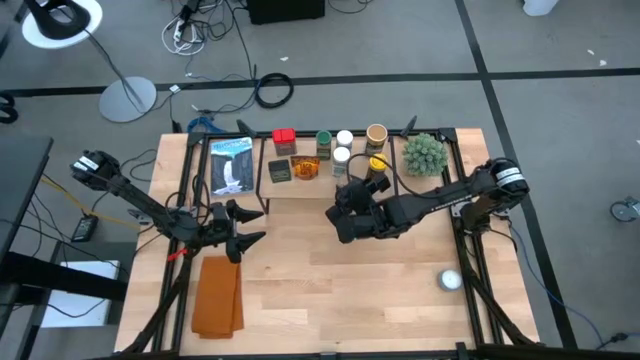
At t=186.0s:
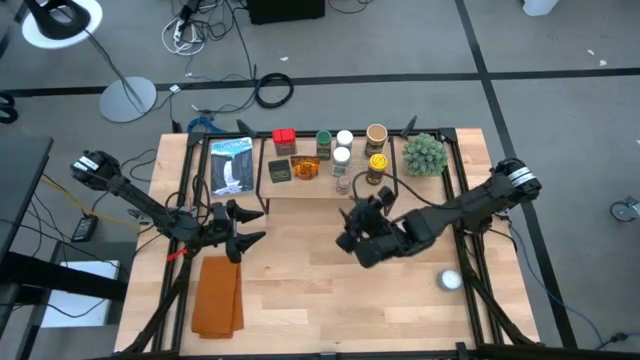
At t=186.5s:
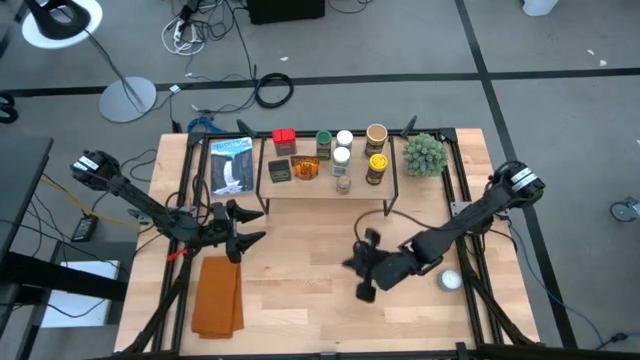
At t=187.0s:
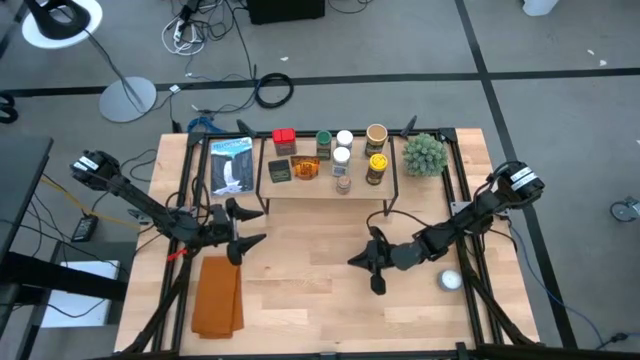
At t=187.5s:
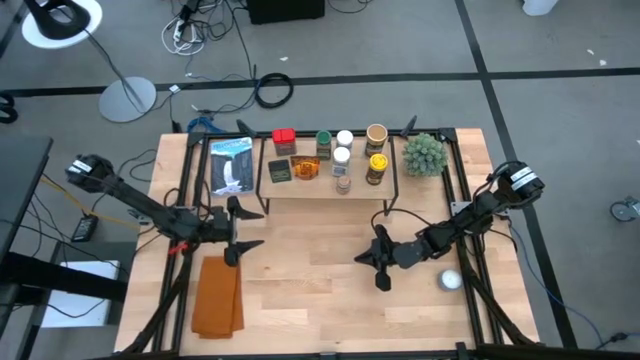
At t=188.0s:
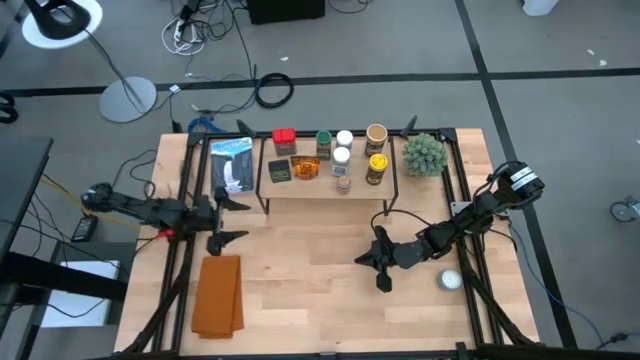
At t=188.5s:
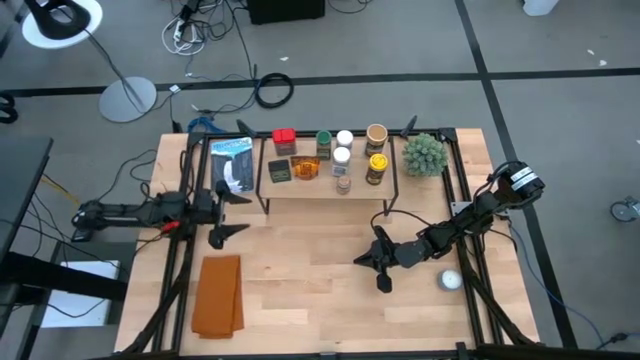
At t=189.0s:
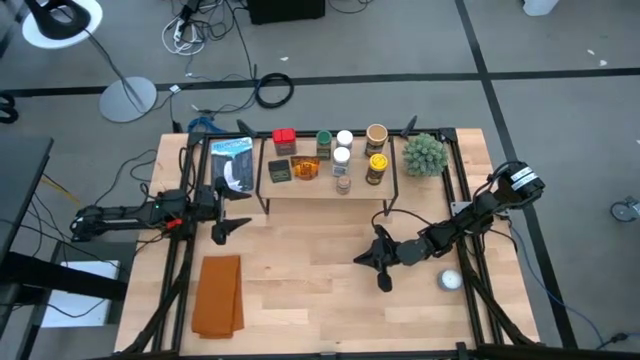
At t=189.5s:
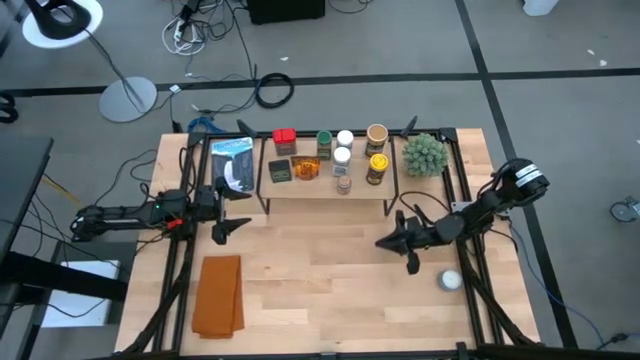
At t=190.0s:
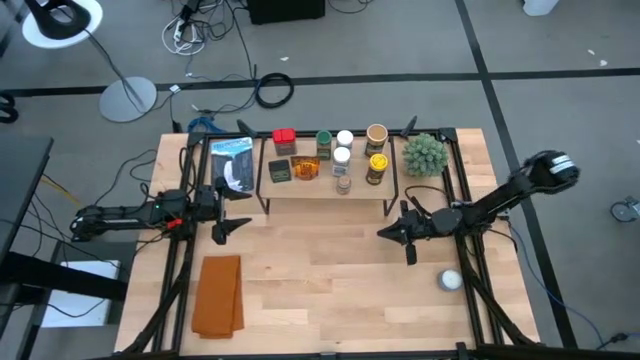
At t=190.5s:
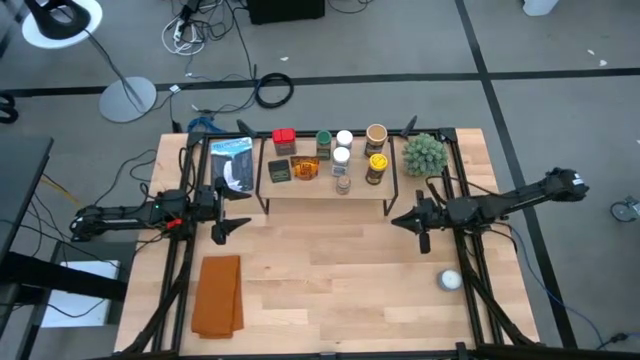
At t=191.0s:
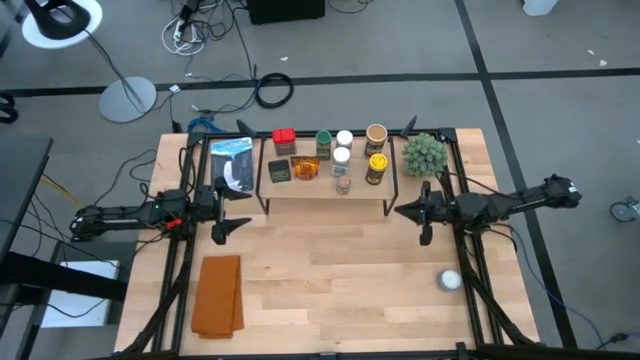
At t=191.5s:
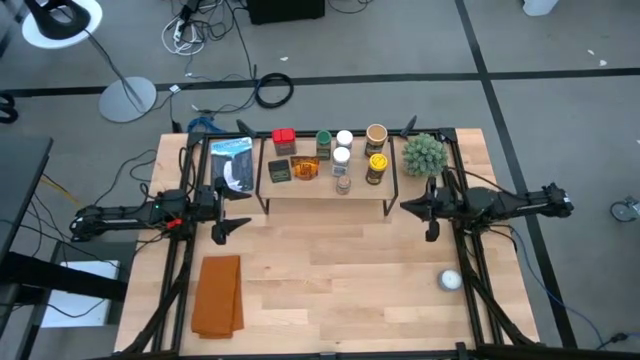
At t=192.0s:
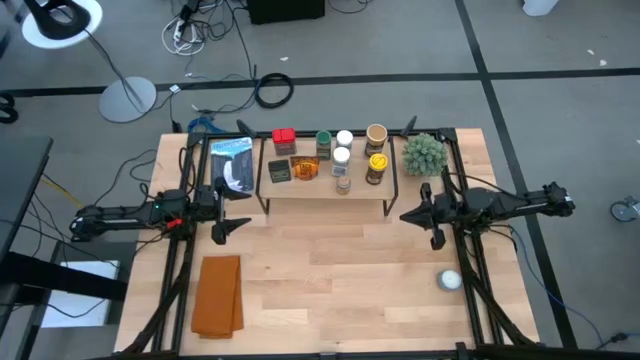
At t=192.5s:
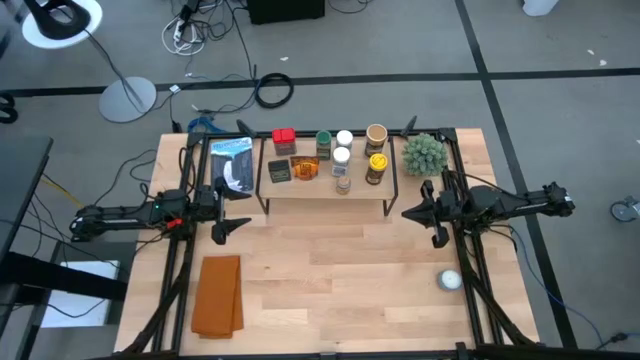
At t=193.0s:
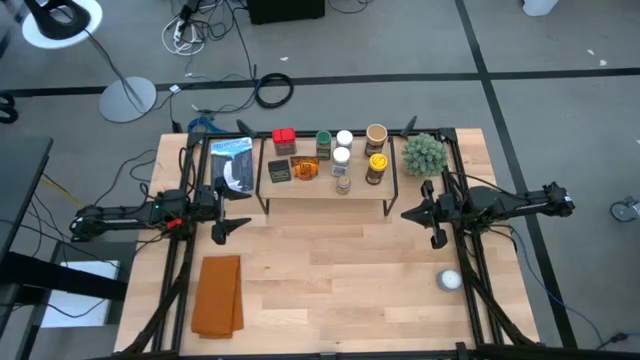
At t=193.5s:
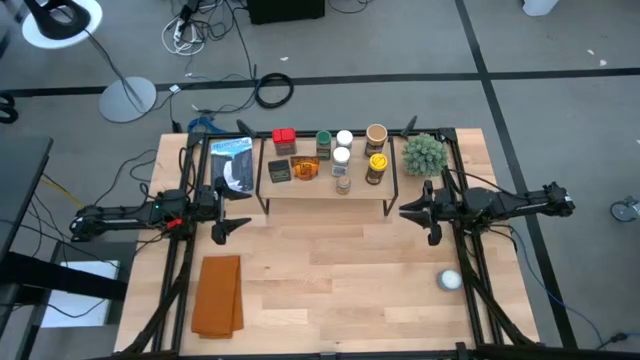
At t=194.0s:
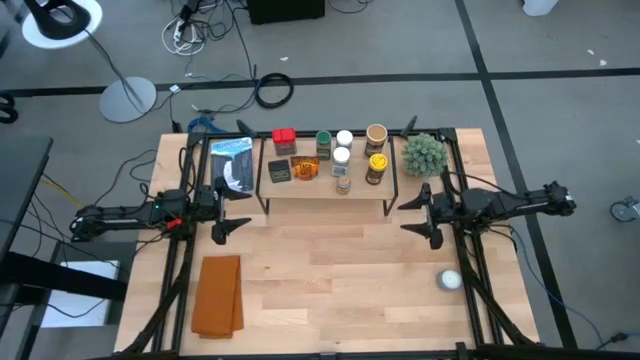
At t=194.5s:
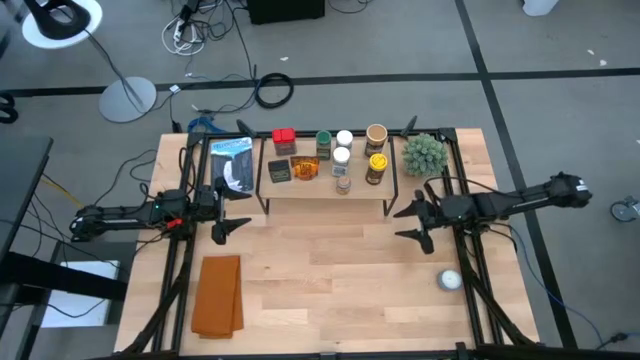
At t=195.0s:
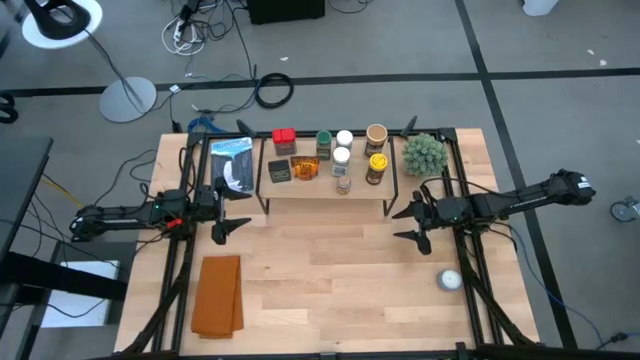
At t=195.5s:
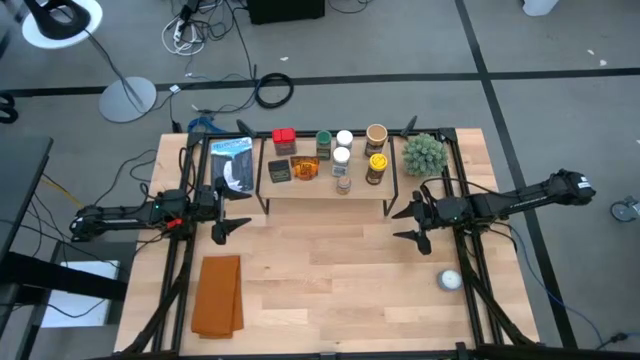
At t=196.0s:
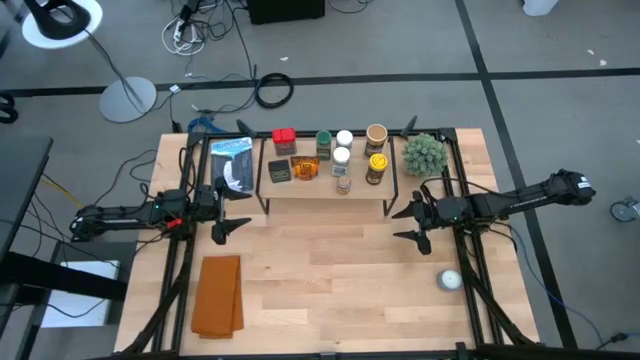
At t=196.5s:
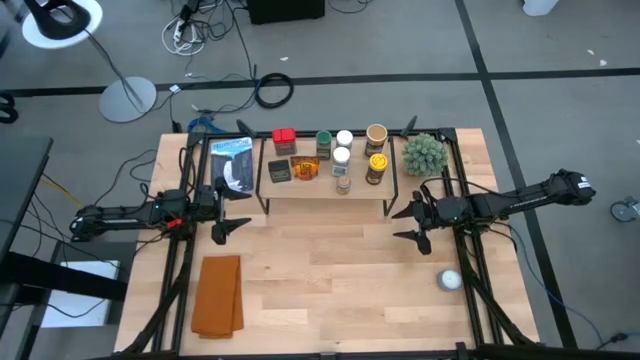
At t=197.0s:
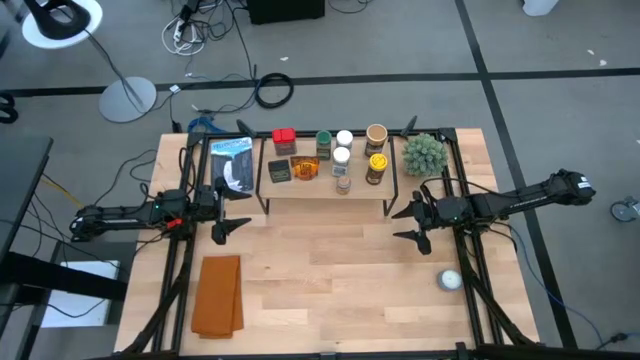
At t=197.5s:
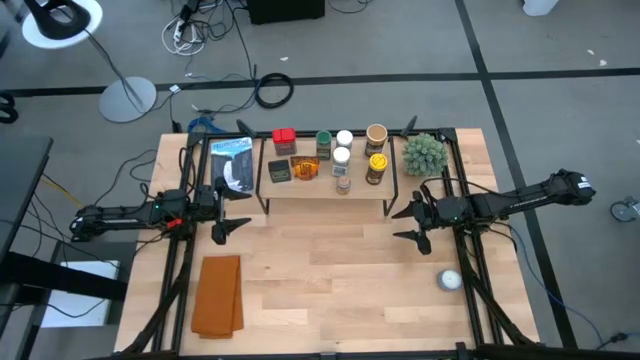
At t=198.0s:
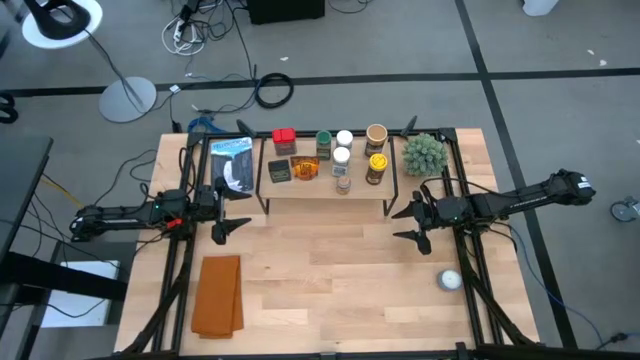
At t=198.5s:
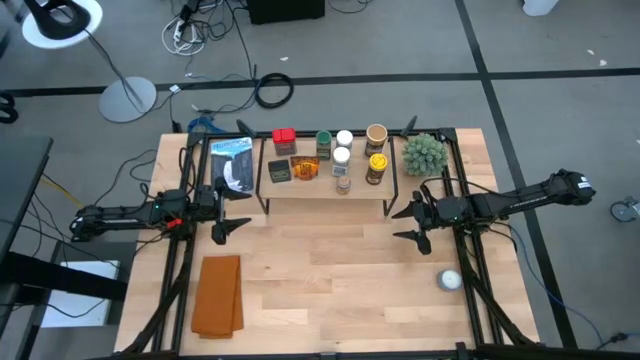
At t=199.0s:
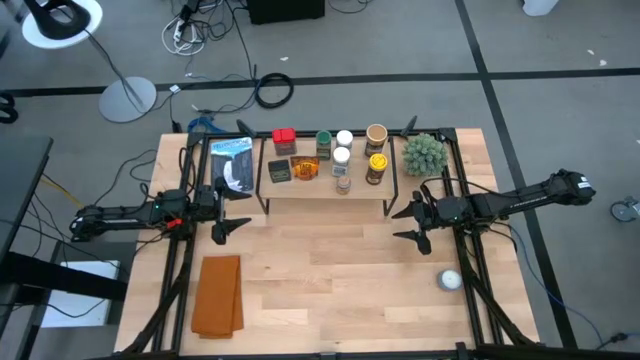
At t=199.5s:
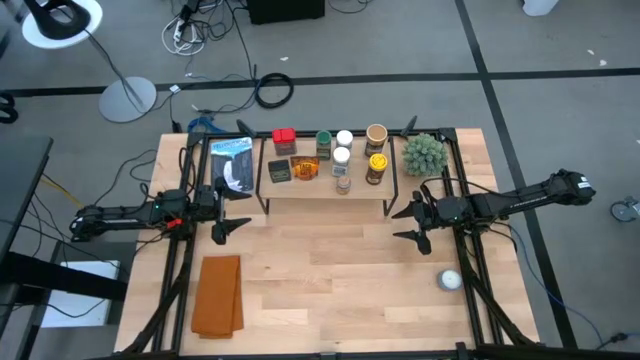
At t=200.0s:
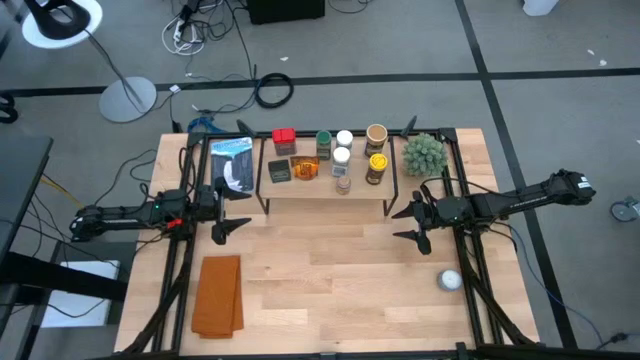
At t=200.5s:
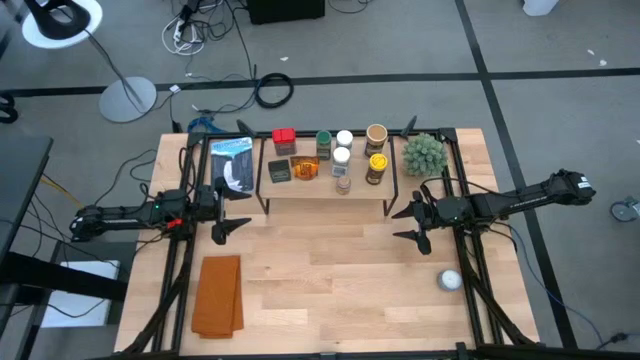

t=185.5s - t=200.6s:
Task: Shelf spices
Return to Home Position

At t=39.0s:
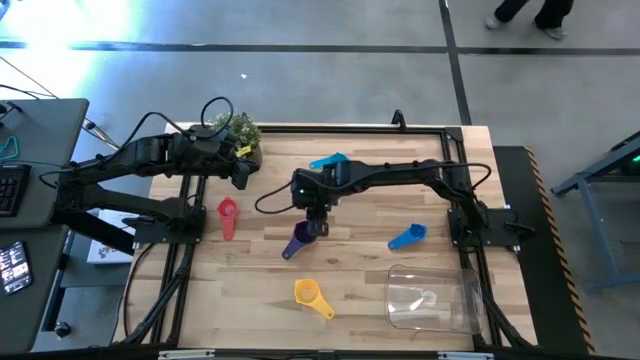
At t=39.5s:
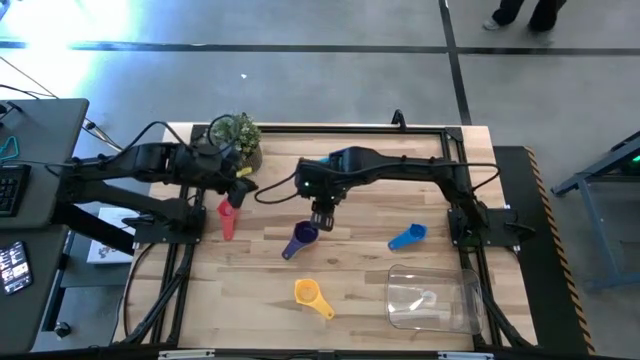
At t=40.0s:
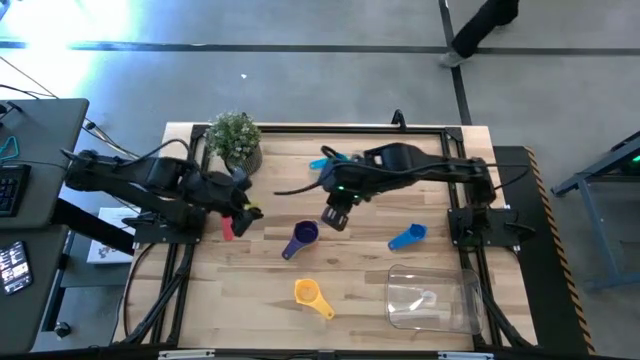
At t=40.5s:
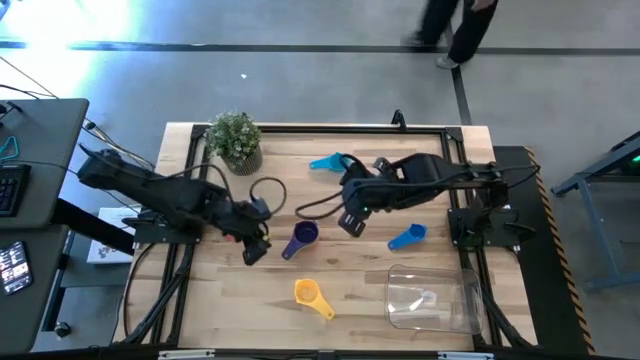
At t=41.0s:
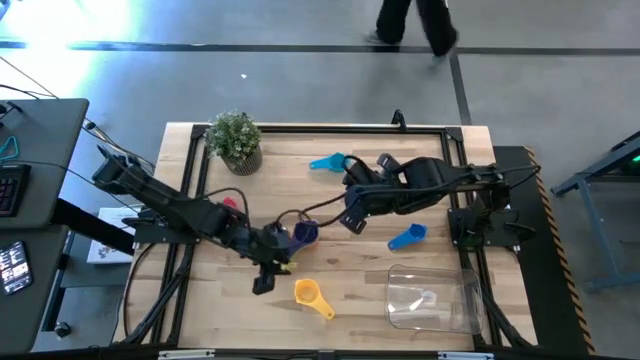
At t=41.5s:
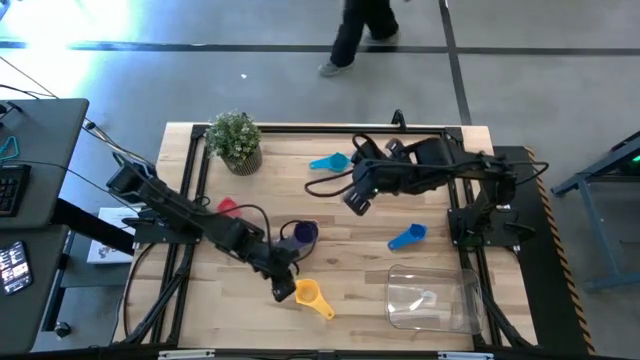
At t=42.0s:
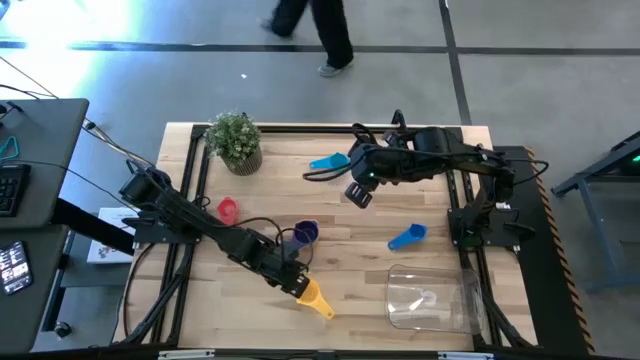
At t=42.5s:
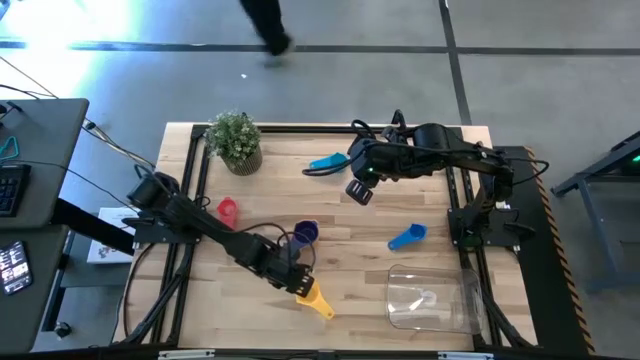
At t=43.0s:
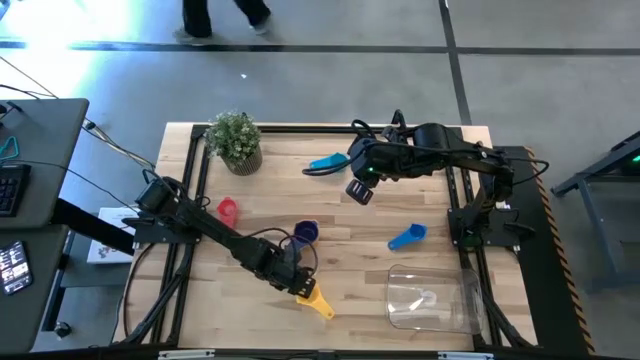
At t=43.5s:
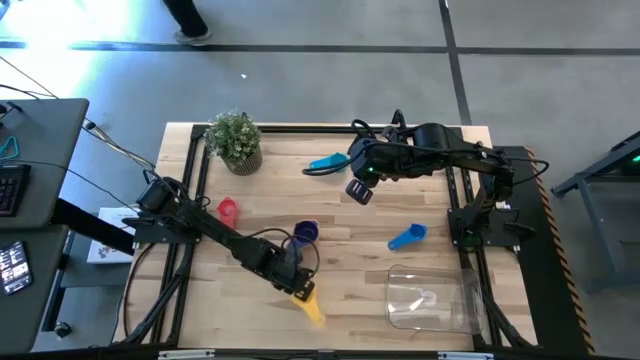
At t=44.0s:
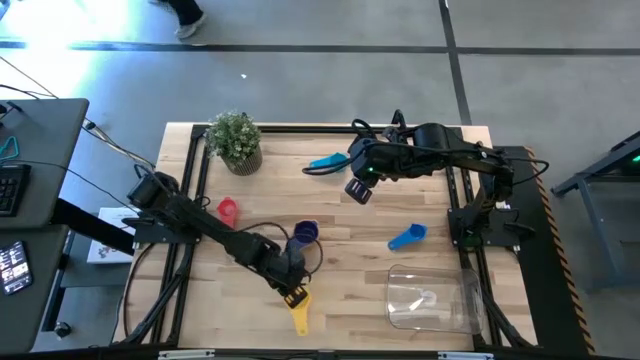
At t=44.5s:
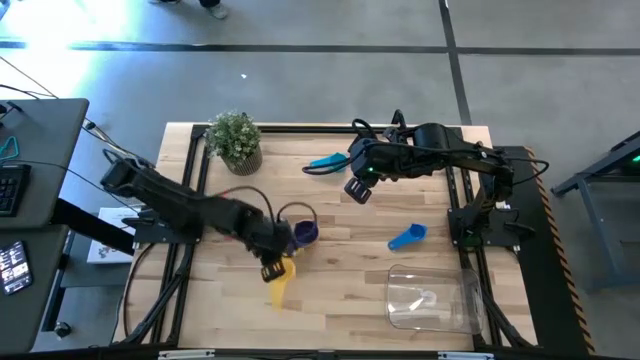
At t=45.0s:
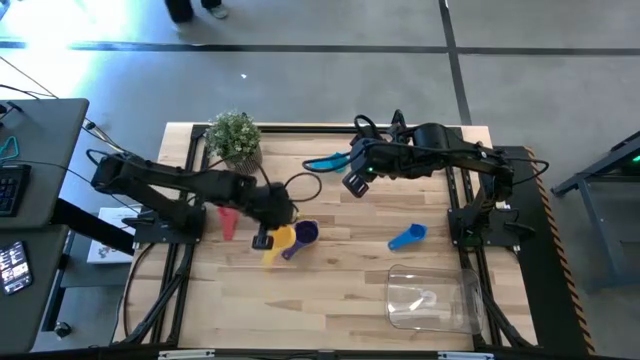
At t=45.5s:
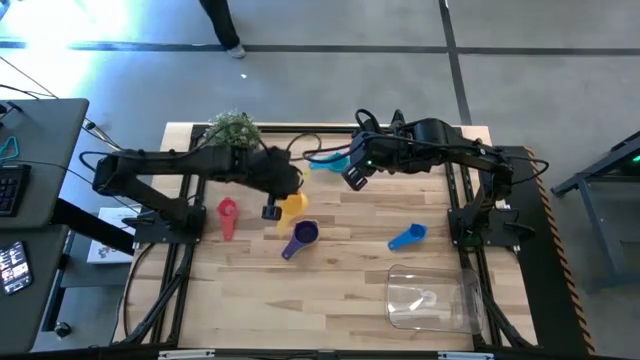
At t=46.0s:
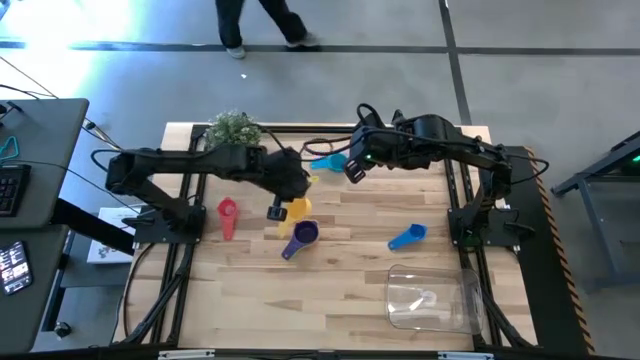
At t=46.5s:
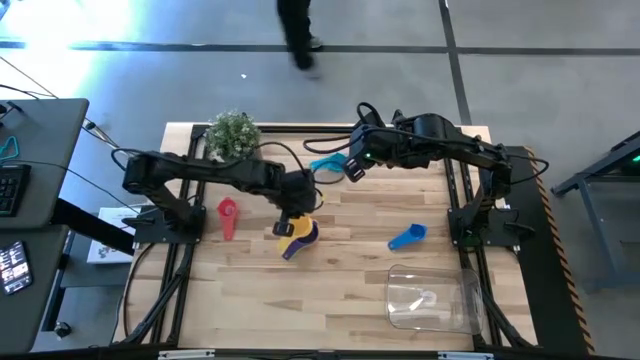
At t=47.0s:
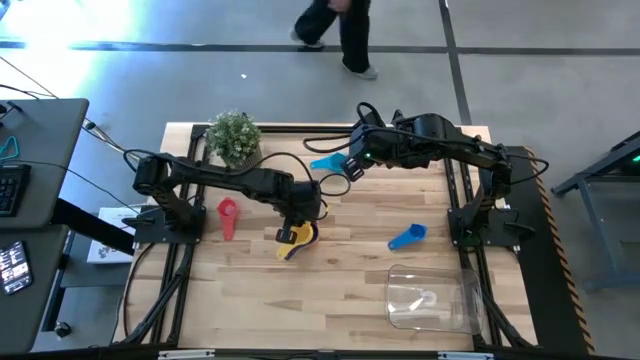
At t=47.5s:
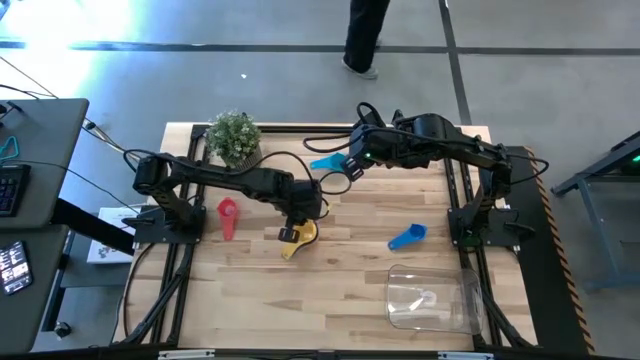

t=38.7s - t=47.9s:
Task: Nest measuring cups in basket
Stack the yellow measuring cup on top of the violet measuring cup
